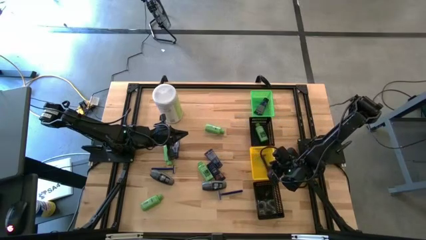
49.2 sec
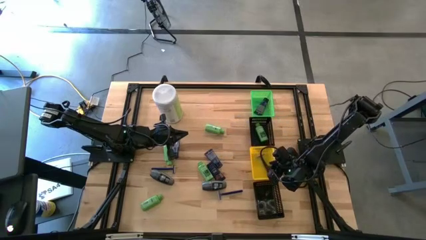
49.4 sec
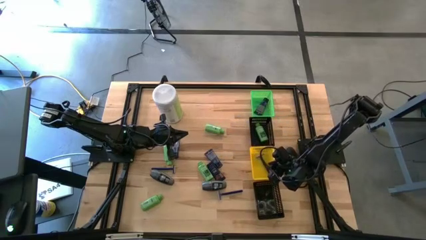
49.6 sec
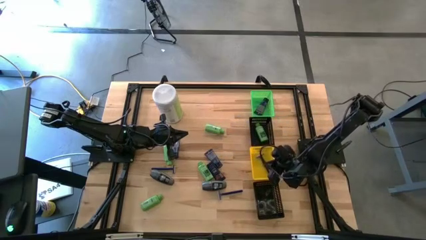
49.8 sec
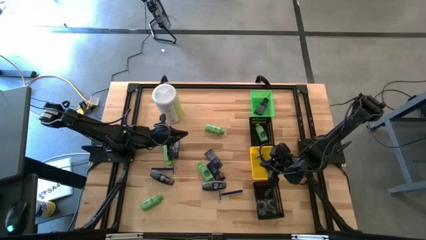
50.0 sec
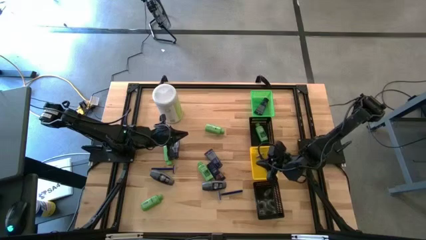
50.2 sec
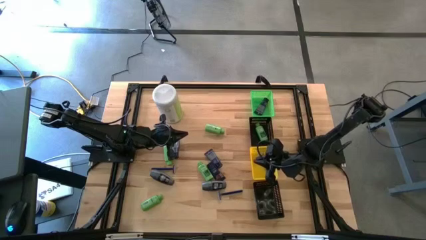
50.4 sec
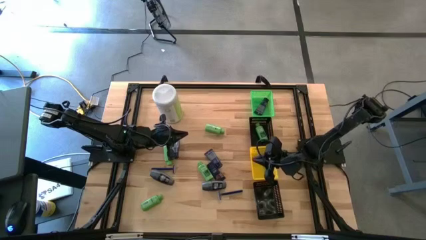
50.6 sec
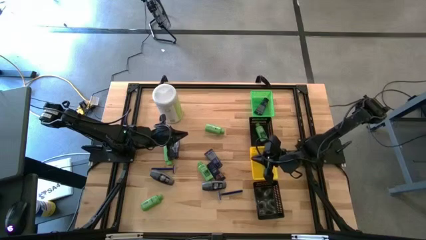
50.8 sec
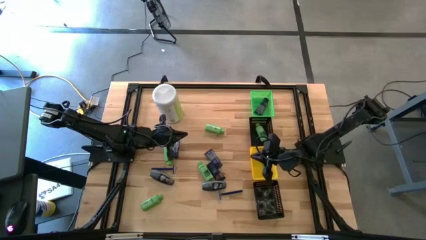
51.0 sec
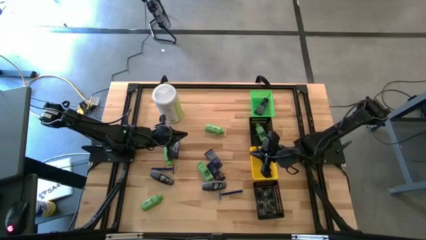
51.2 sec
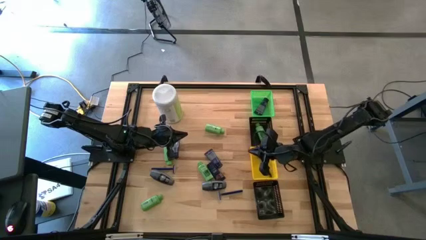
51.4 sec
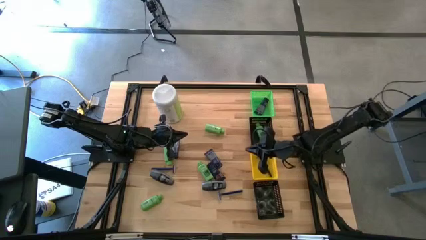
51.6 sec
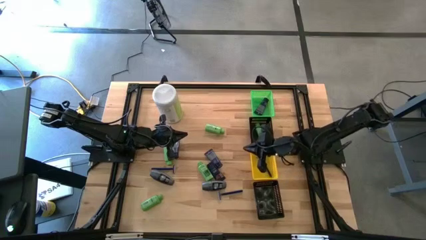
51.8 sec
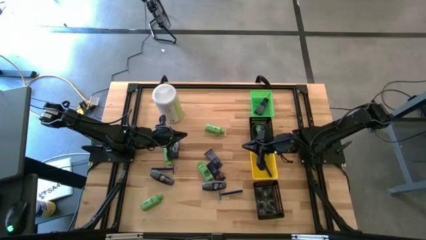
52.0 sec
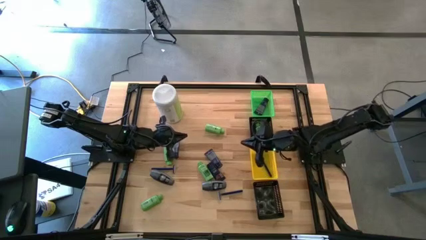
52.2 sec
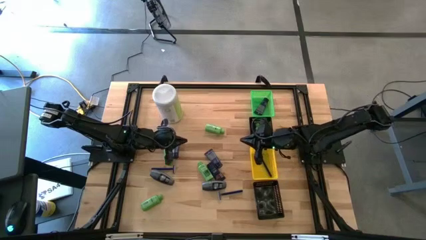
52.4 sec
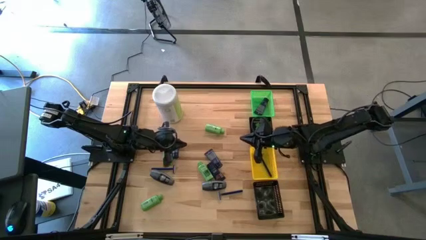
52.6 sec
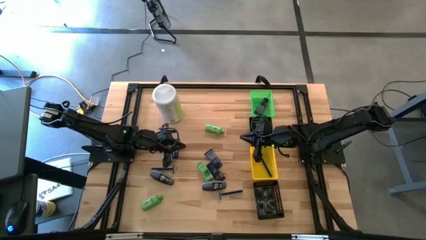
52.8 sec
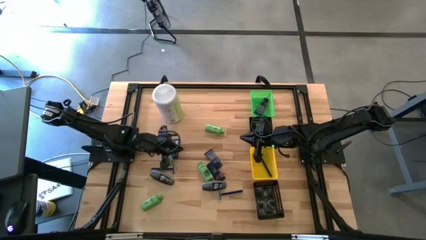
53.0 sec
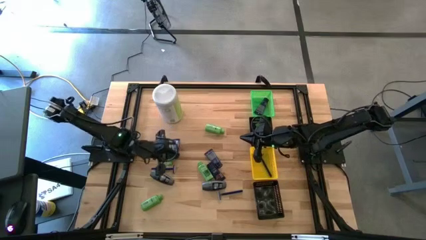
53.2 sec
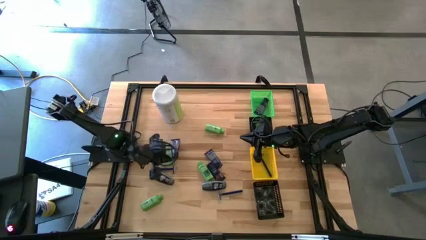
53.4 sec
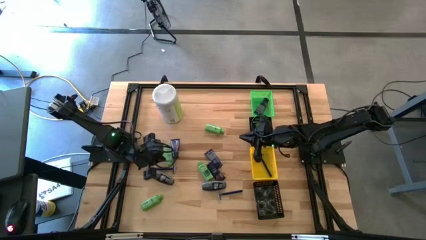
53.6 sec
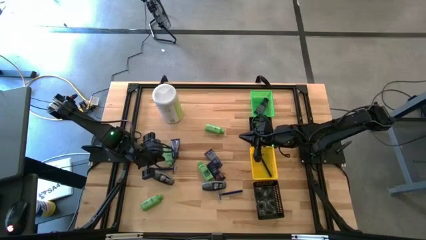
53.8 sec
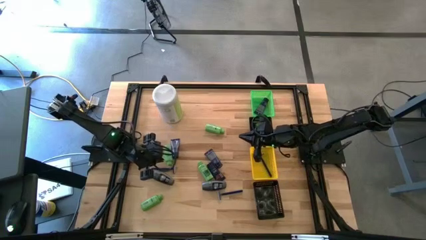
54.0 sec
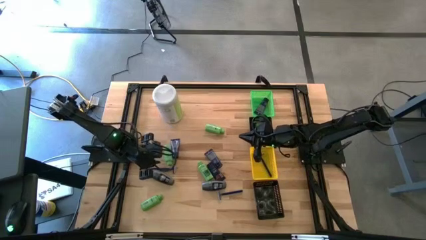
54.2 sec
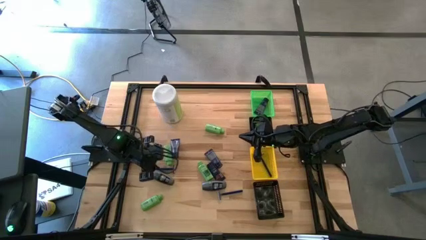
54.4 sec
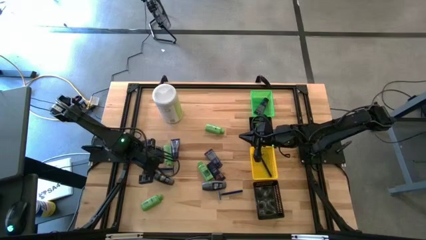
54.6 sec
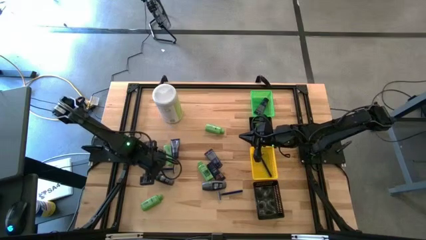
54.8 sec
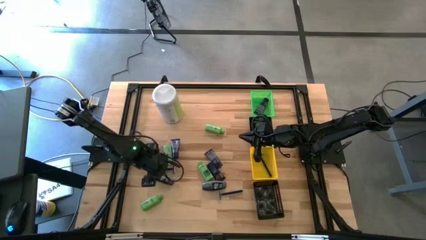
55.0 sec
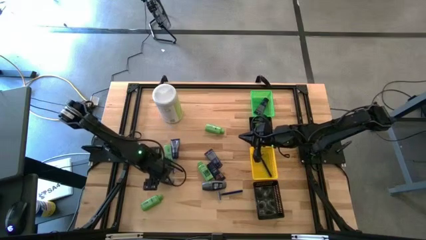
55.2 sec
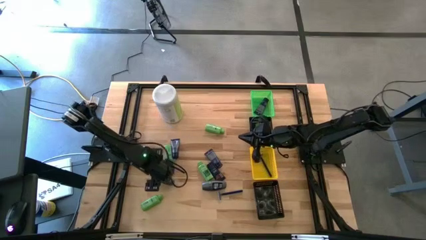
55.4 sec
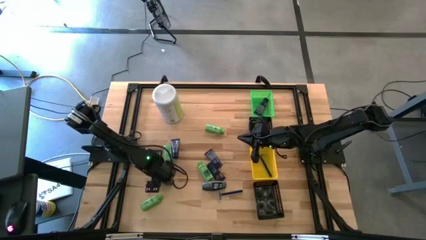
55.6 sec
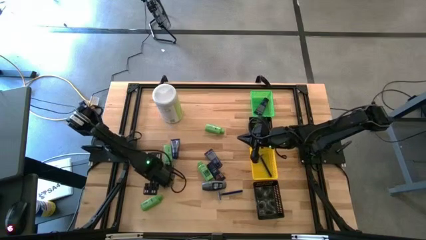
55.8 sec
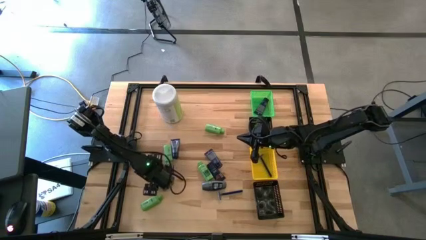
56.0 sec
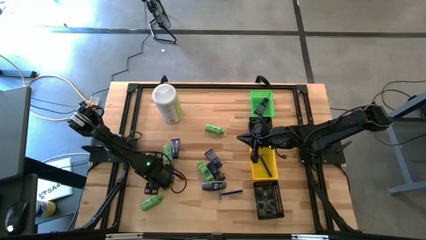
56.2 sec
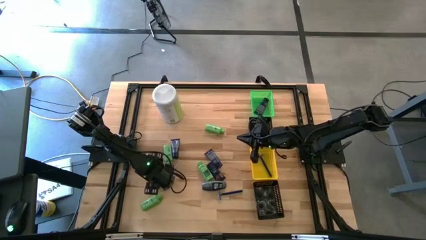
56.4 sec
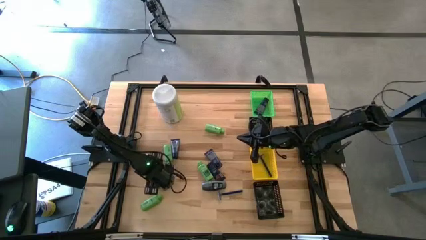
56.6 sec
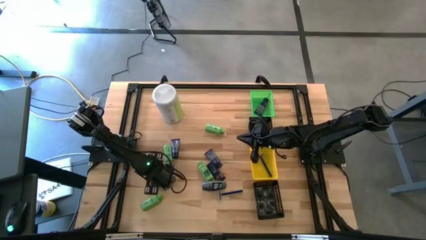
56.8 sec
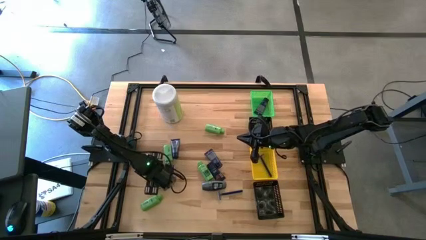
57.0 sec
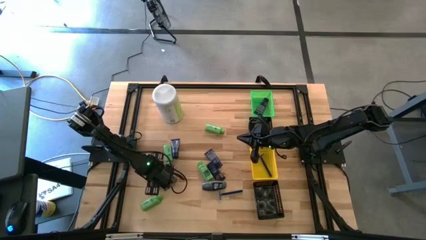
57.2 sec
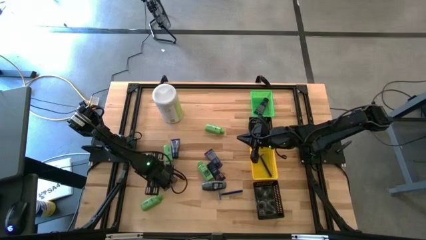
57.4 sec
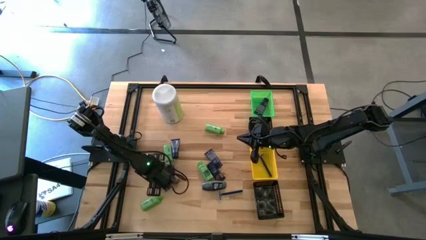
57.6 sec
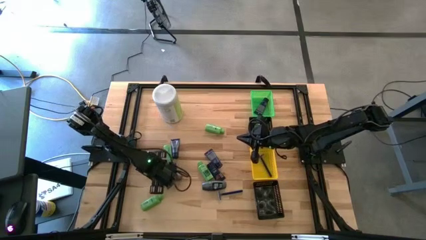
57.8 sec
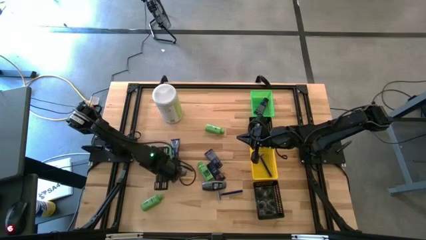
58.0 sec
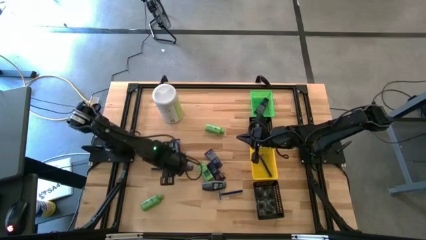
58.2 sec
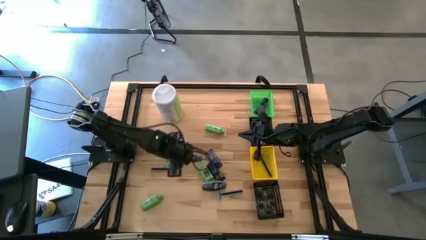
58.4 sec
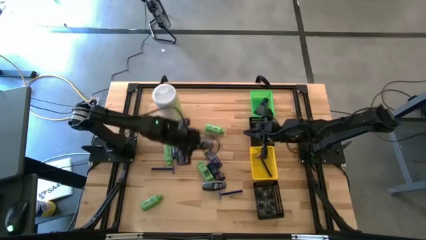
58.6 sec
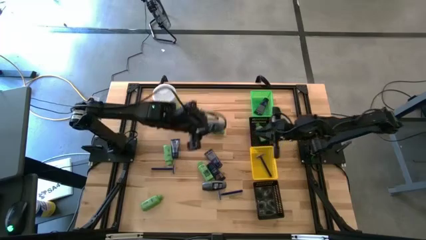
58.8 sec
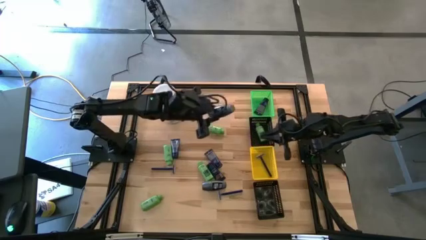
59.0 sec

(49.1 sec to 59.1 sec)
Task: Pick & Place Travel size toiletries
Put the gray deodorant into the bottom black basket

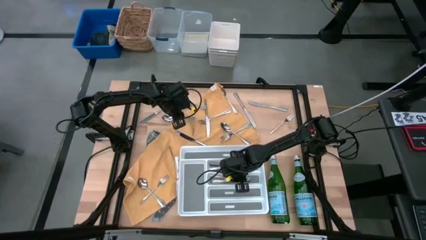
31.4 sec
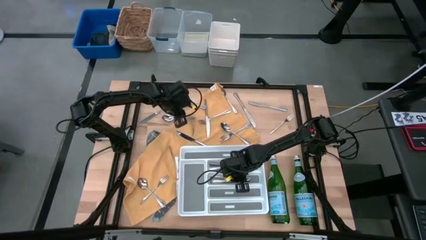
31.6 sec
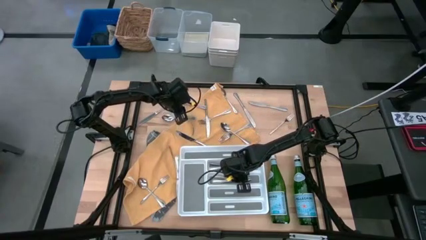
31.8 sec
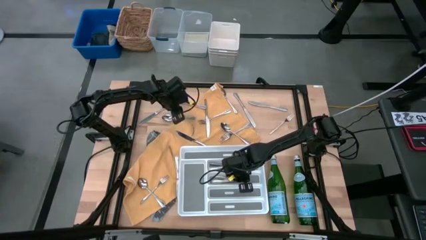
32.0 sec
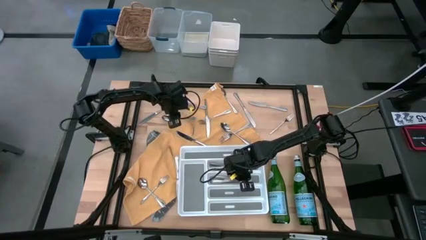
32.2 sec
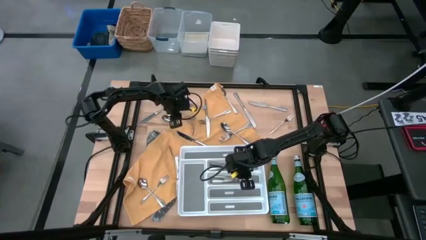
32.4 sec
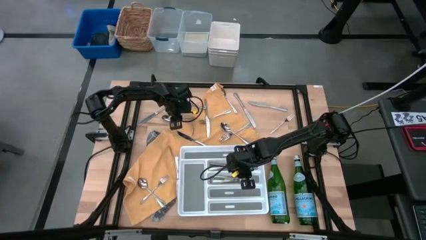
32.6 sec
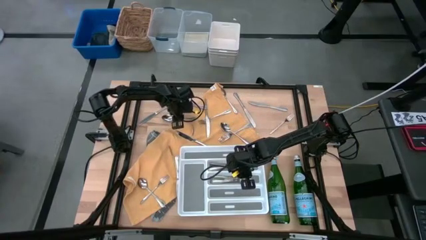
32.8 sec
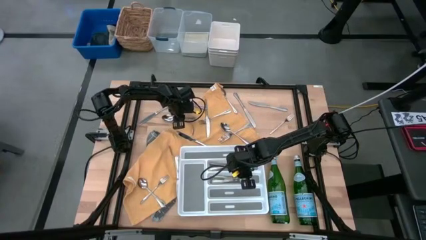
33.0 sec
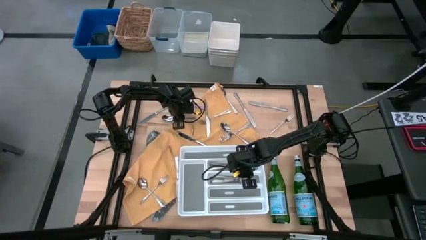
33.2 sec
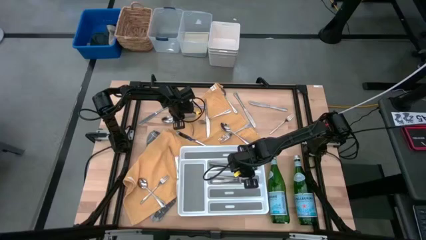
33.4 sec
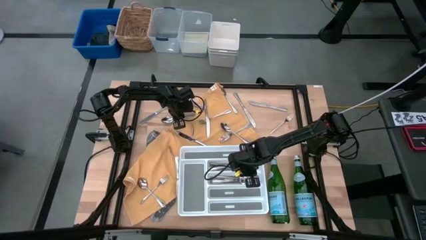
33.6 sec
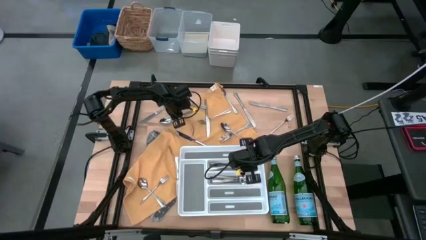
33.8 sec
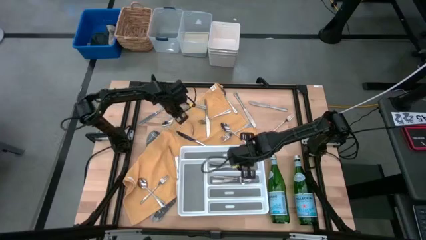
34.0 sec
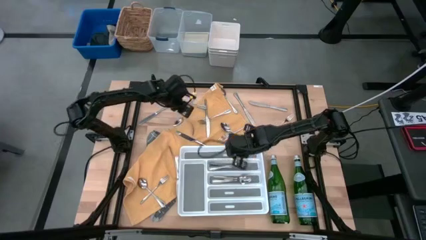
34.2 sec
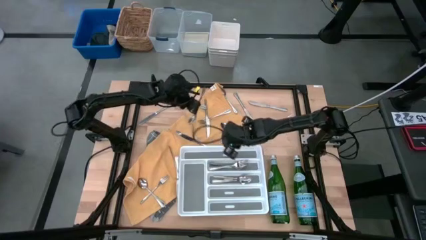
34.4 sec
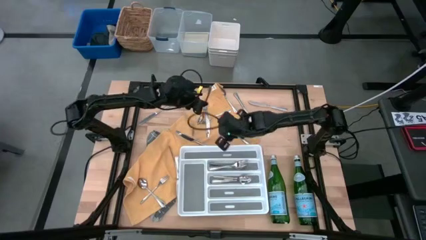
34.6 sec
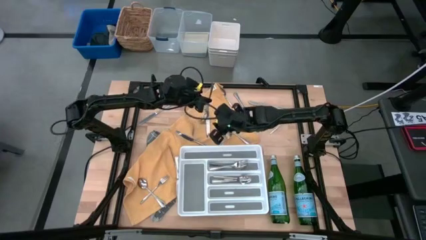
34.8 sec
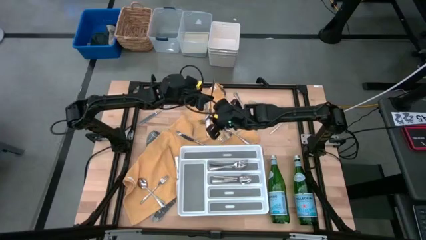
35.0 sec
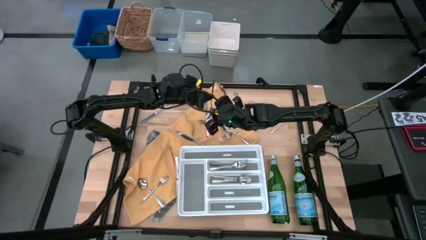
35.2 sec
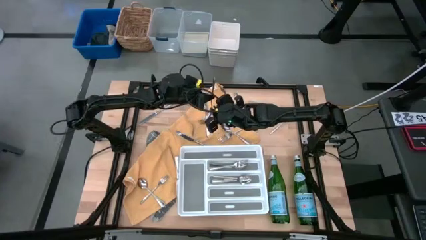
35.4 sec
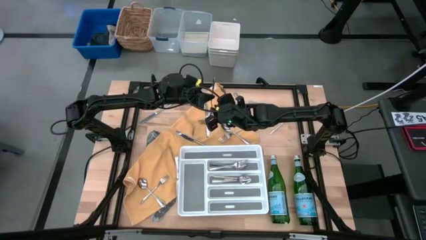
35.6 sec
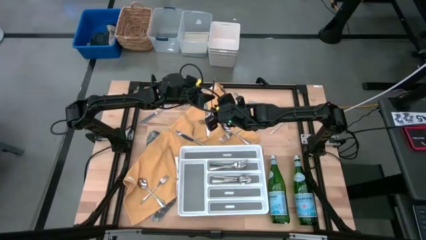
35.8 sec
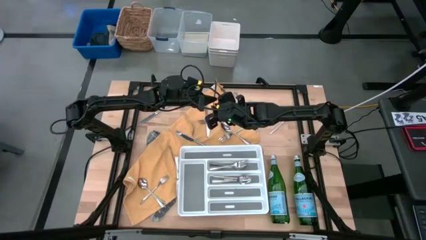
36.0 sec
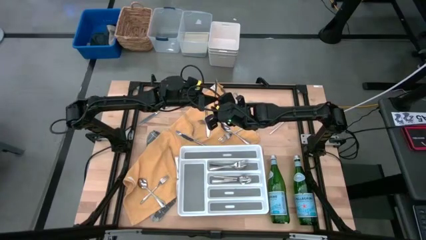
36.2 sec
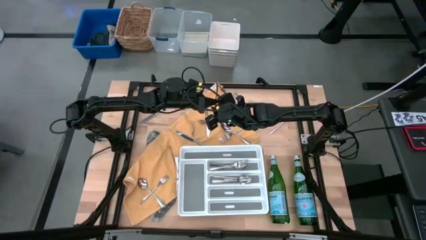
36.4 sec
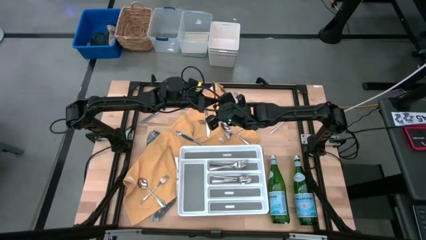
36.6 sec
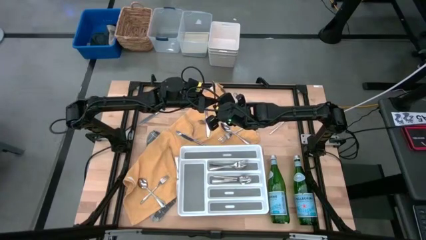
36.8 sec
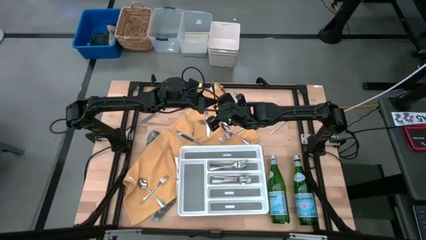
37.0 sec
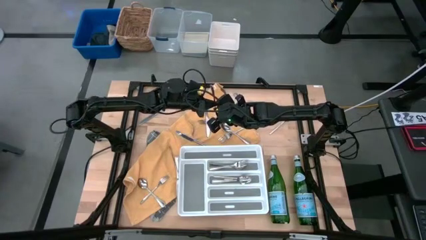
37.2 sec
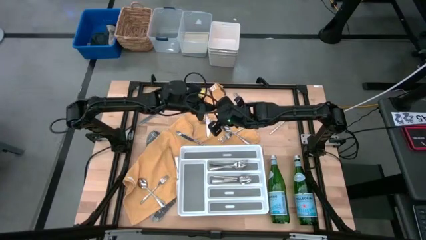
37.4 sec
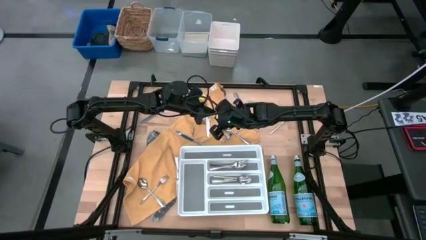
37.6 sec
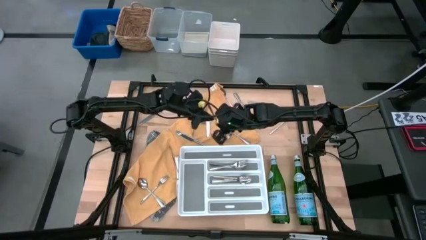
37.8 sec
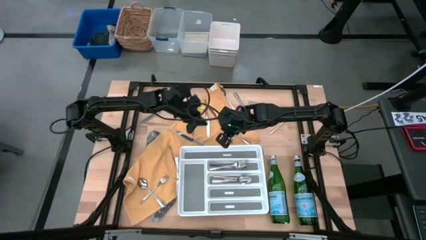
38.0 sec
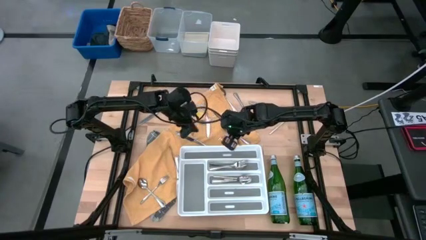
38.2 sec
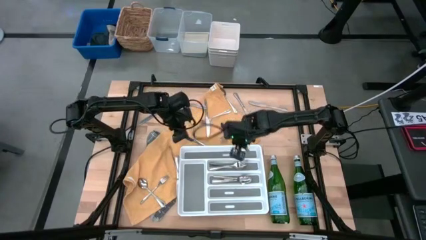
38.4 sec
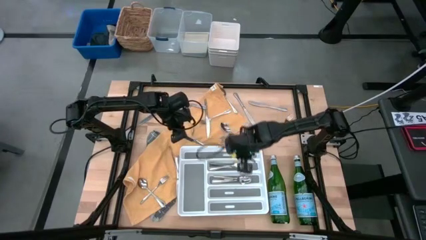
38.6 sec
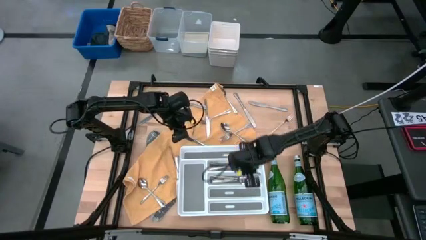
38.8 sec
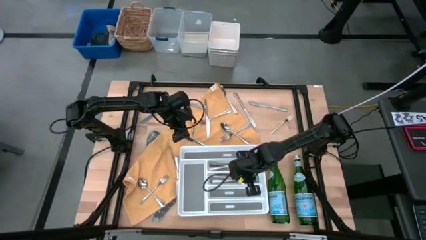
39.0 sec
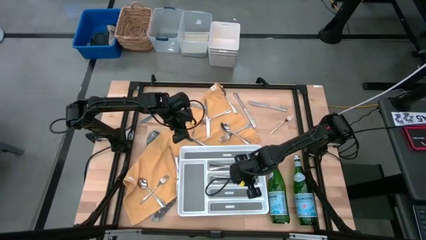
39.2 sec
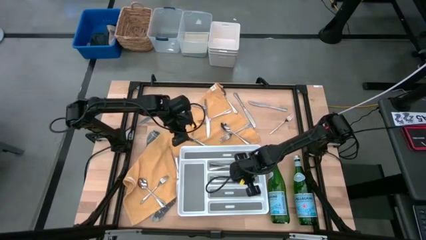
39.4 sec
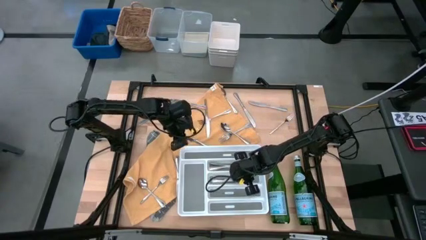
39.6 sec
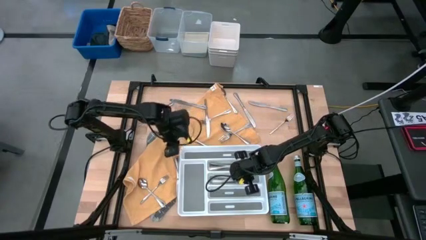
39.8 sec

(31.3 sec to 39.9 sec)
Task: Sort silverware
Put the silver spoon into the white silverware tray
